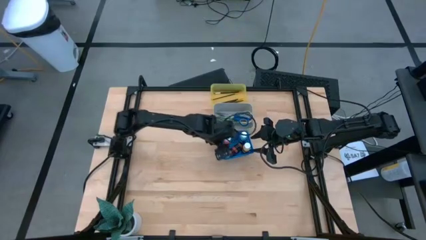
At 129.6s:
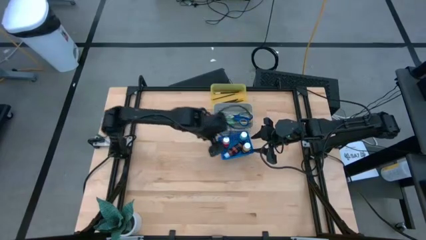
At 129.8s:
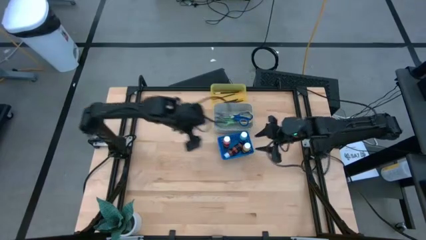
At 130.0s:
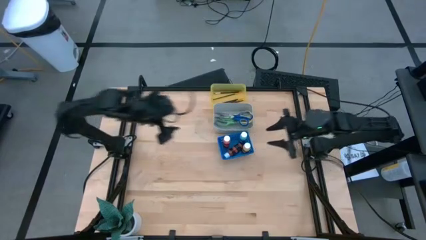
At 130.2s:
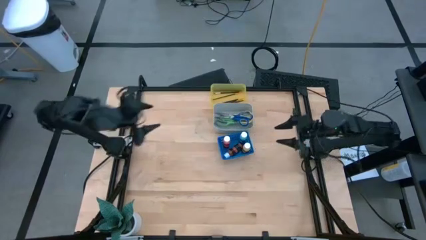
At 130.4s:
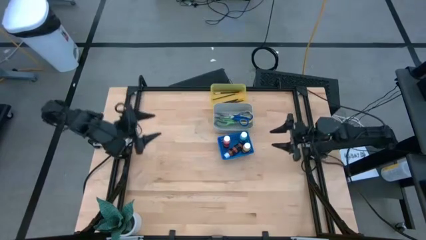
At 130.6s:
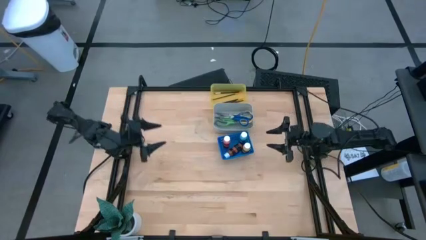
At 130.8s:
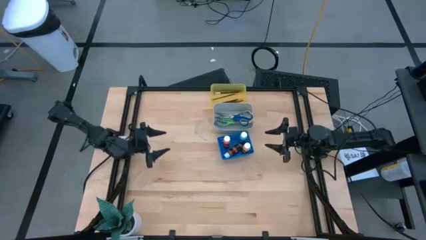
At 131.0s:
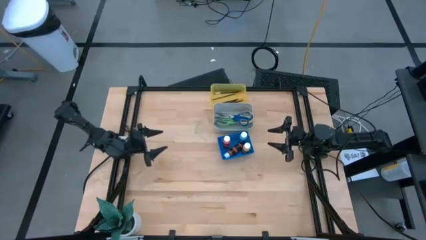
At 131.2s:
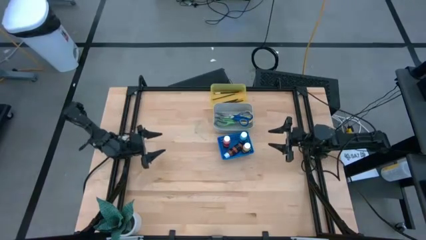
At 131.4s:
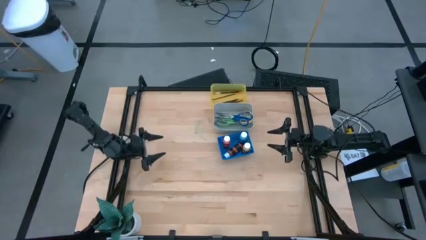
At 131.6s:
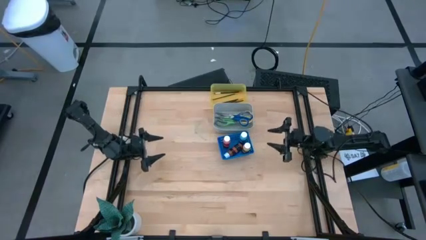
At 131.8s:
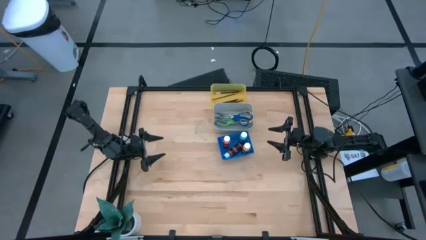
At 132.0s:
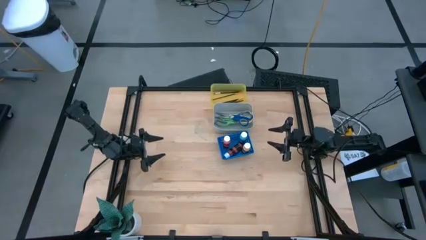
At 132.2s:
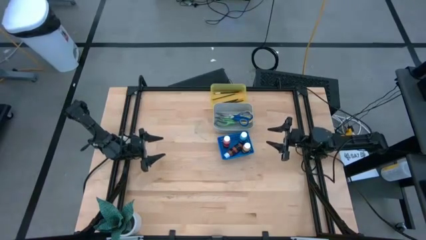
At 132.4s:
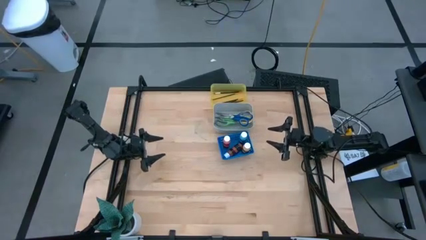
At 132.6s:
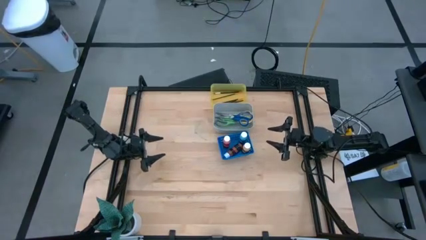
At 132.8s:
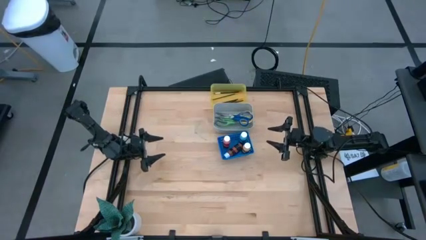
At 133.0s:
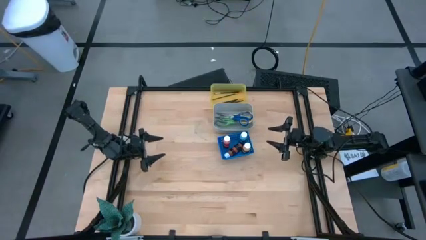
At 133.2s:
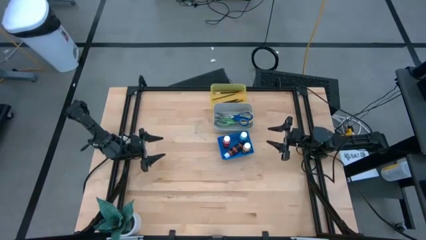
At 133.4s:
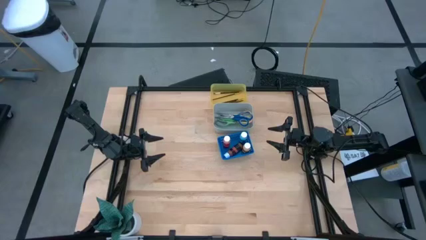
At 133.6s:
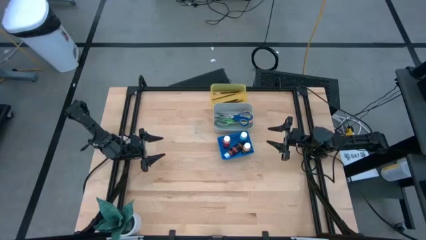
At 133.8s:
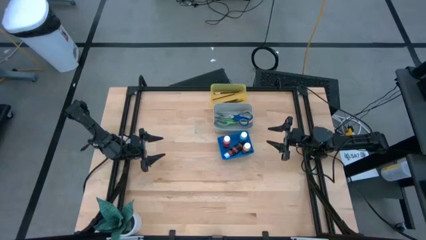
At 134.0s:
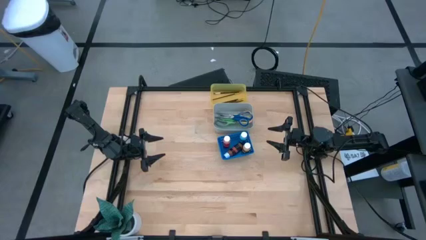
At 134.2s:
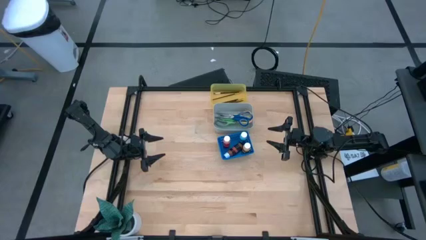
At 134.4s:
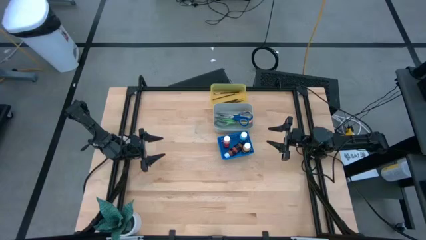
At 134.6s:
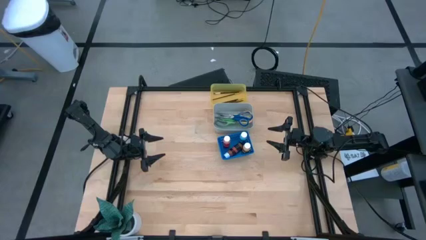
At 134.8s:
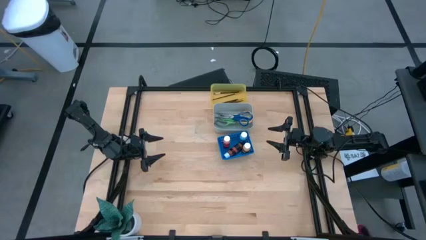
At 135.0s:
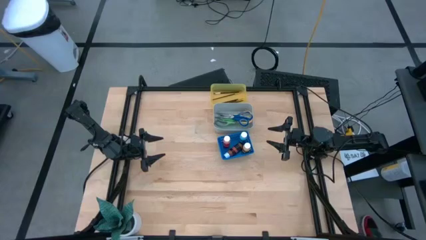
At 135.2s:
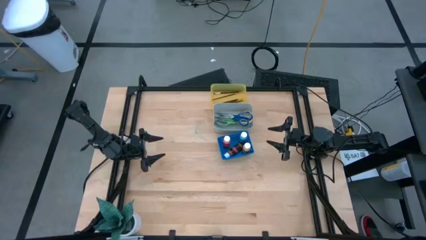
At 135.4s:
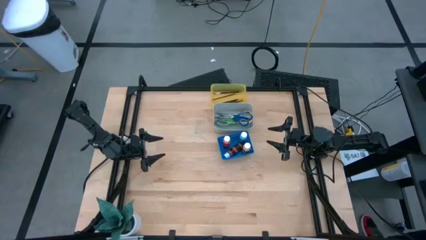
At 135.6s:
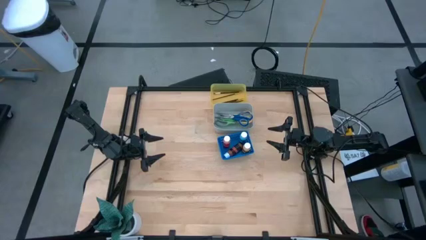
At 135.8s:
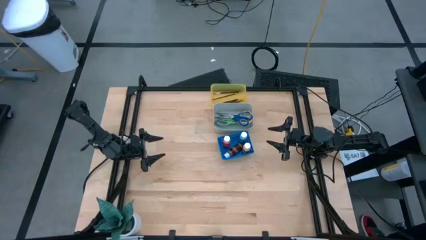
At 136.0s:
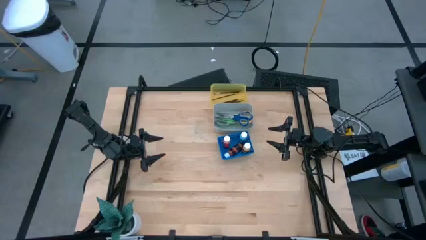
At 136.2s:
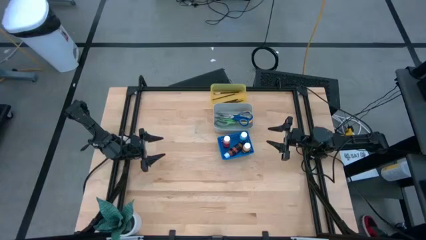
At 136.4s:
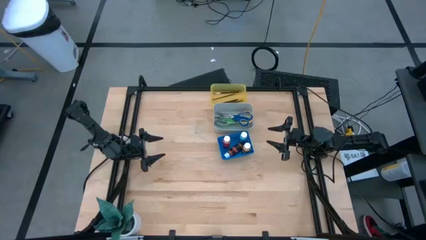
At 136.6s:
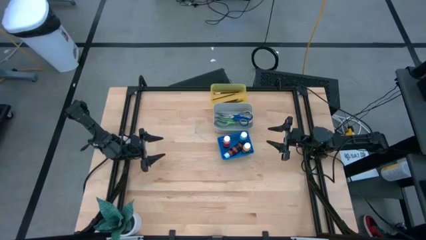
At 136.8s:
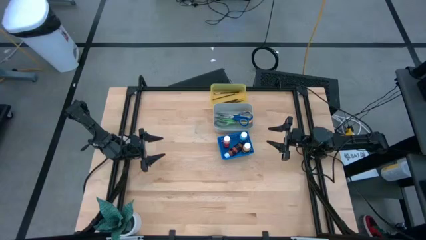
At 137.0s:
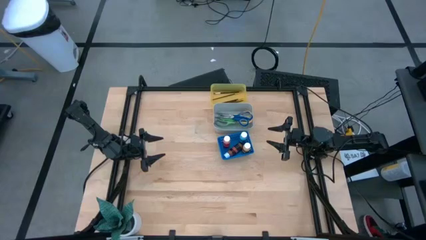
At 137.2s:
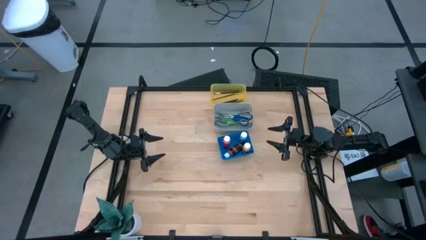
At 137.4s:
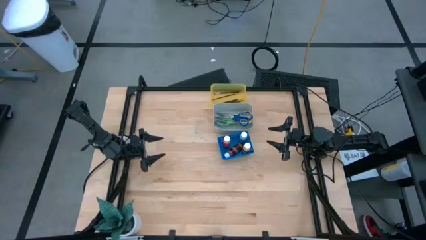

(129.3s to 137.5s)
Task: Pick & Place Paint Supplies
Return to Home Position

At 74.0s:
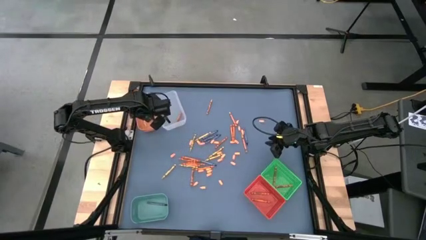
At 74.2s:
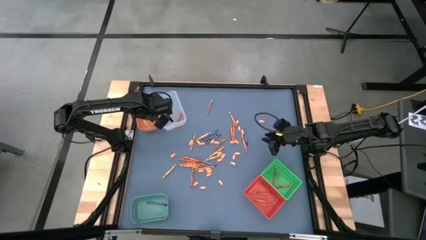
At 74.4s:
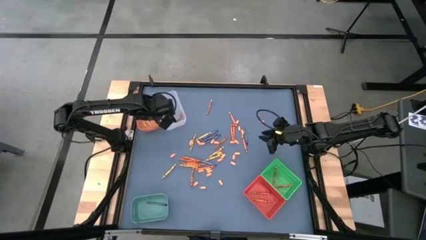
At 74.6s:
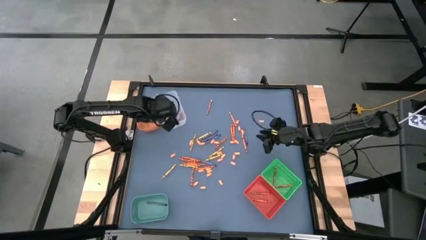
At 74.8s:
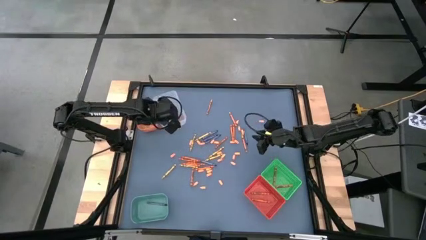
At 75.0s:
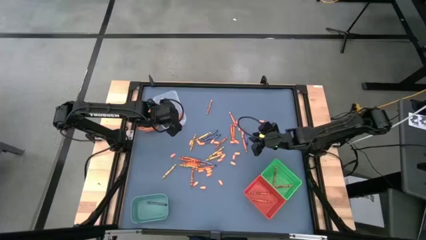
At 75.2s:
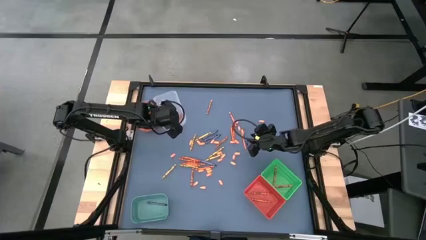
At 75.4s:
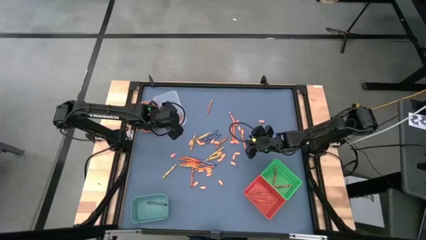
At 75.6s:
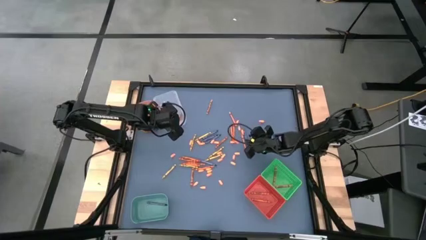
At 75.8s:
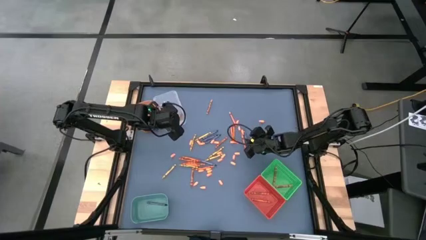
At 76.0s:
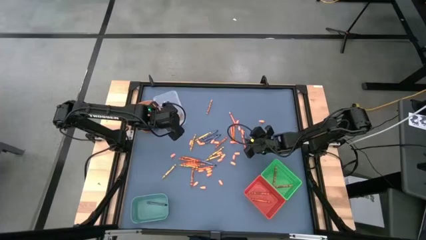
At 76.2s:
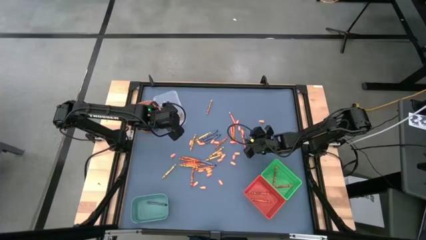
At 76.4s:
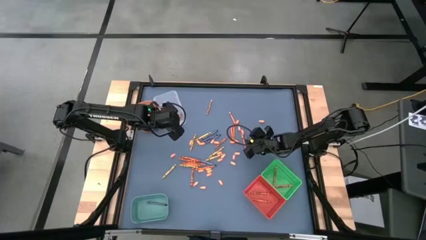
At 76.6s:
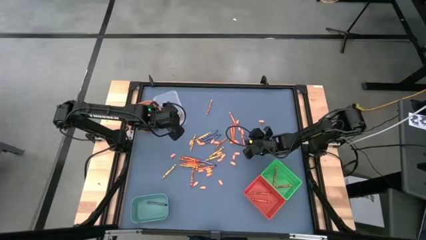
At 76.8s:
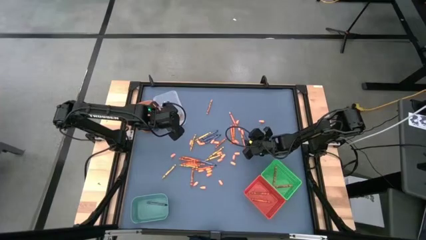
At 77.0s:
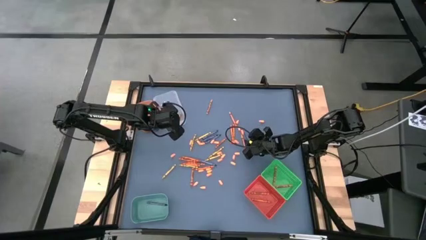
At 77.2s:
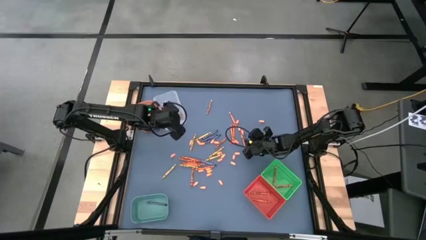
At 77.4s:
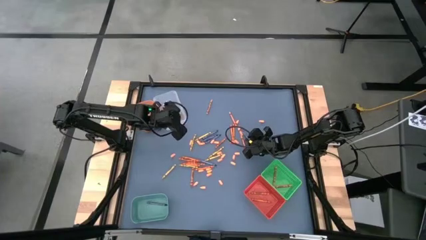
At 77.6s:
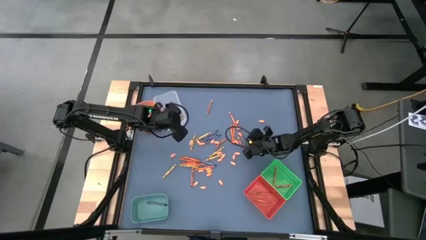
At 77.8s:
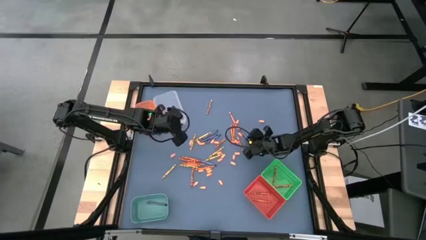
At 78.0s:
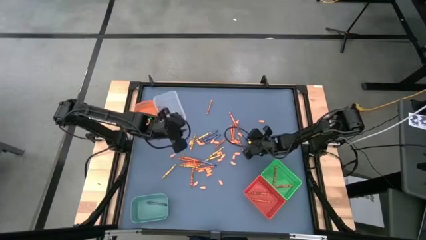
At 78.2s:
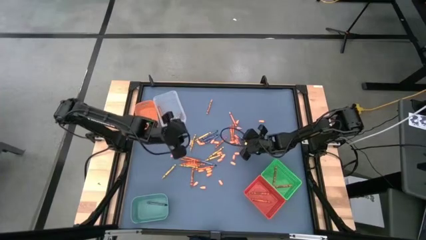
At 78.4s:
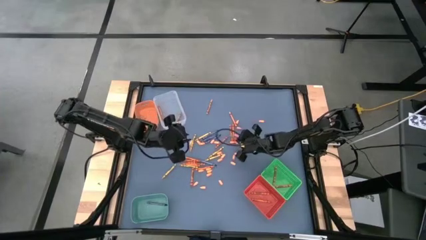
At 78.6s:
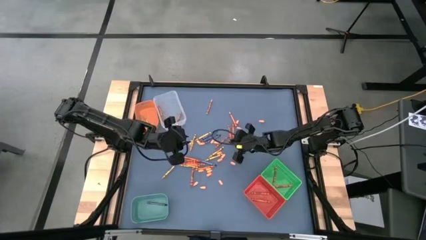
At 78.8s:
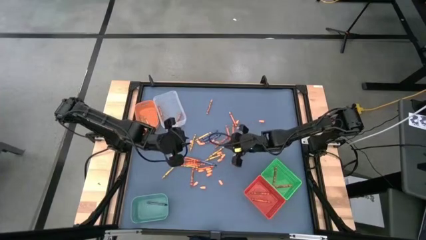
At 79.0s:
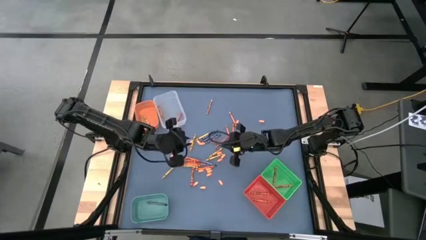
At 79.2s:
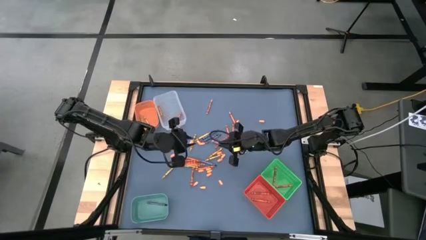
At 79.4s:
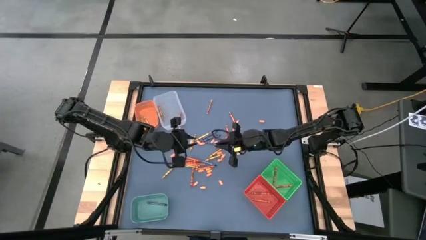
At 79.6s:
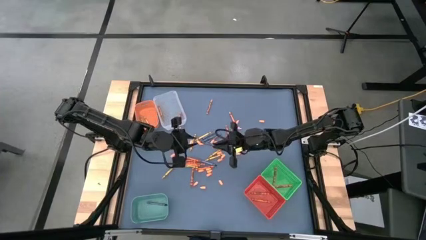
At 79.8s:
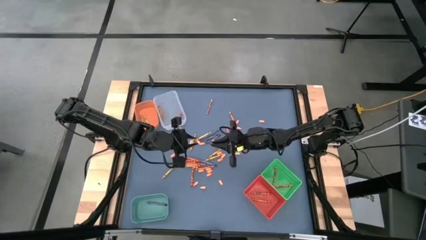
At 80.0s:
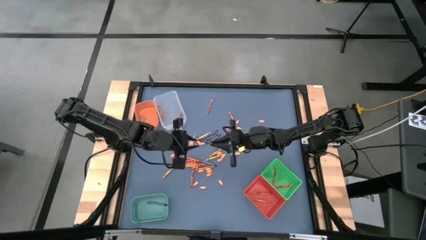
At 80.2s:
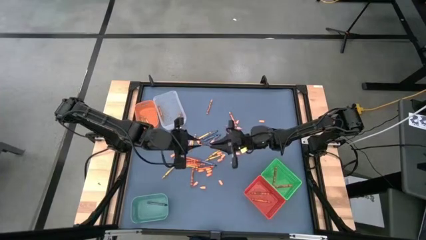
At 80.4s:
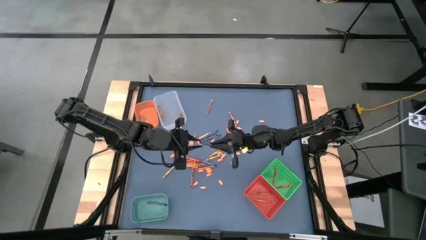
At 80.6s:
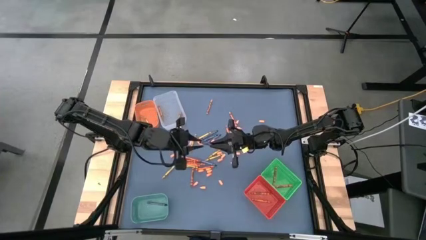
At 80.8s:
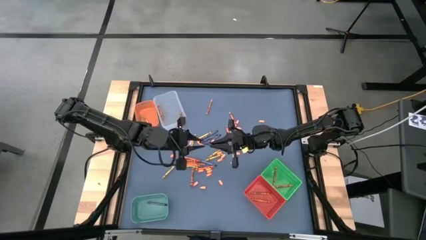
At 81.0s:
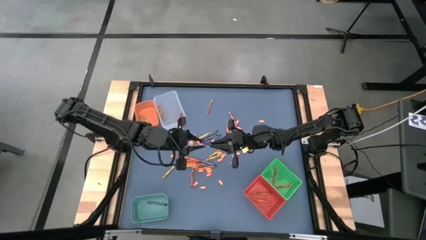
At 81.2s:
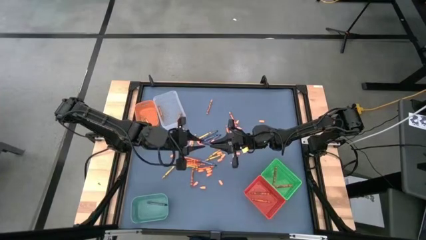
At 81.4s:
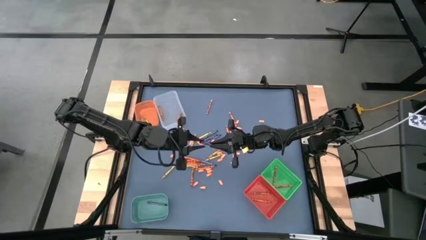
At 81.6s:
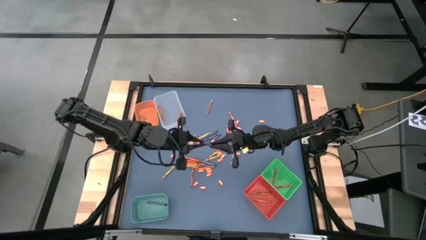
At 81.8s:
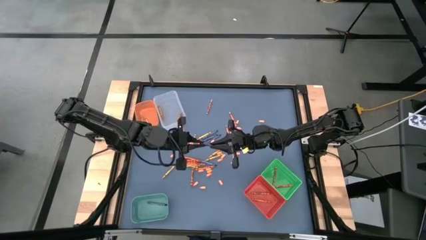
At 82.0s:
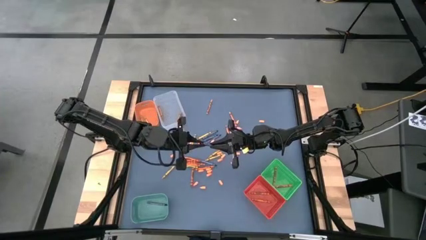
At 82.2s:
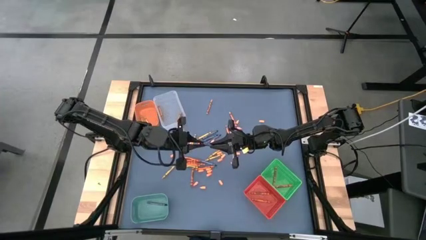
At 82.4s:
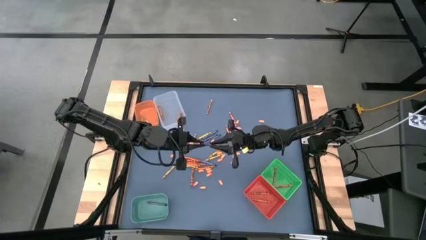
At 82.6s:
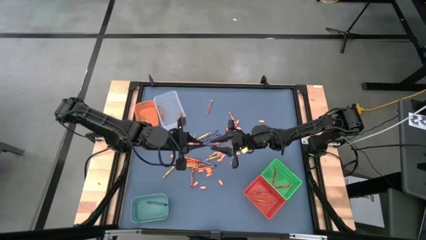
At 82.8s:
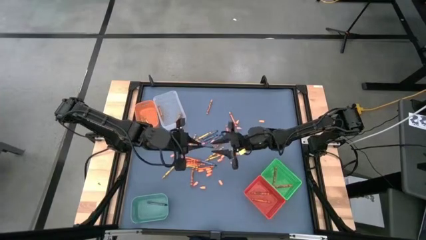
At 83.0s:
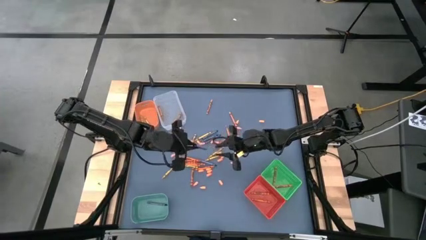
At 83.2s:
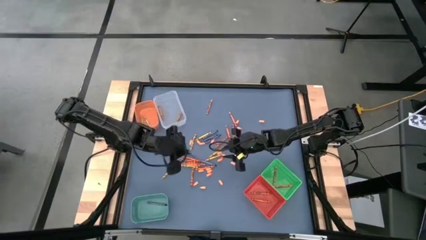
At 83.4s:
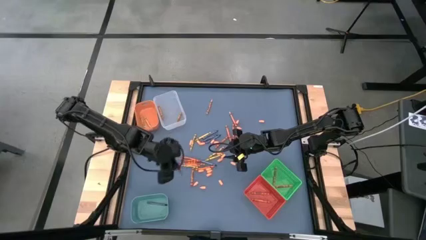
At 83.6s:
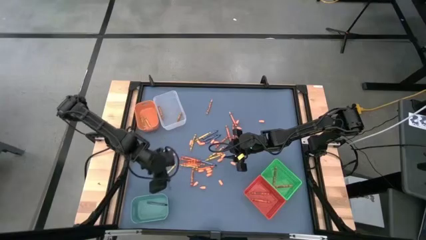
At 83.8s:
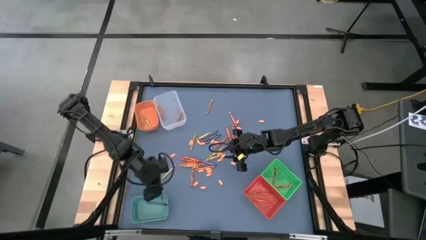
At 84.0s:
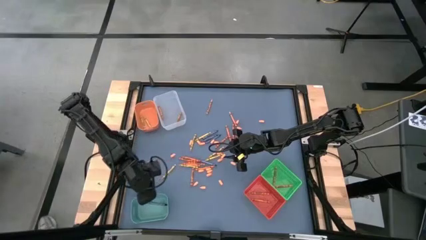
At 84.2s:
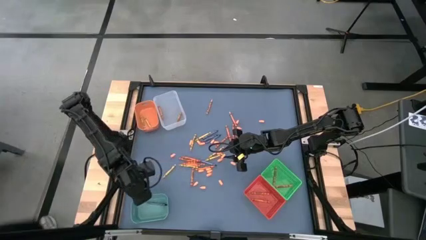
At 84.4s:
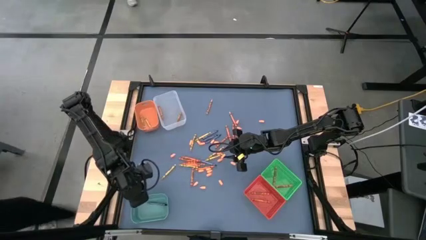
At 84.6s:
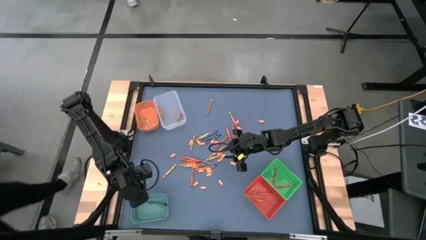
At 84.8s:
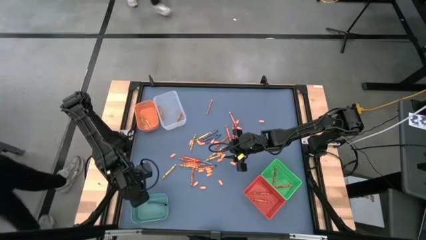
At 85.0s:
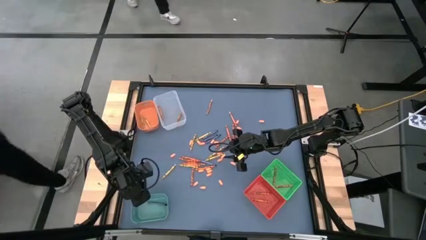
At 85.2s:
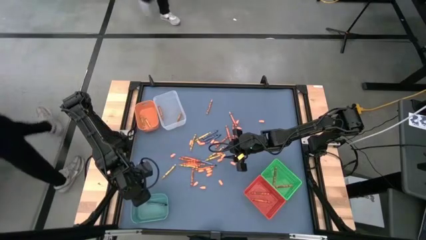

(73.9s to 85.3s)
Task: Sort crayons
Put the blue crayon into the blue bin
